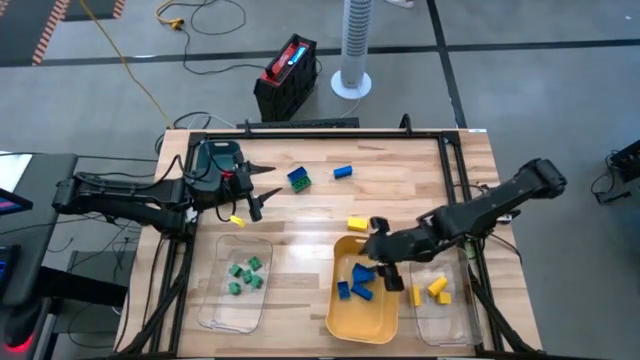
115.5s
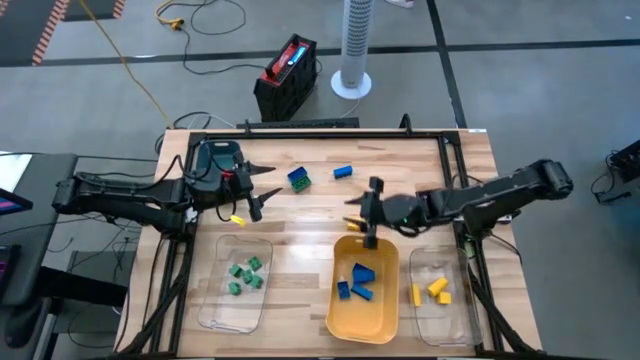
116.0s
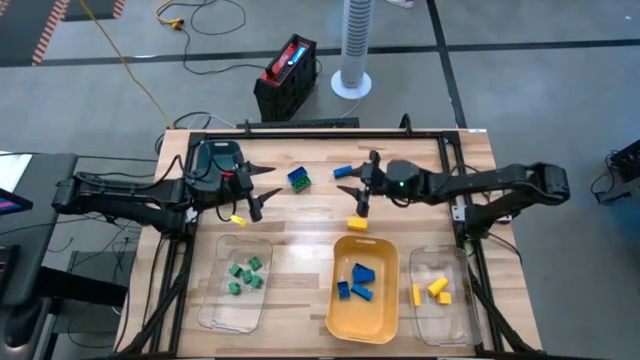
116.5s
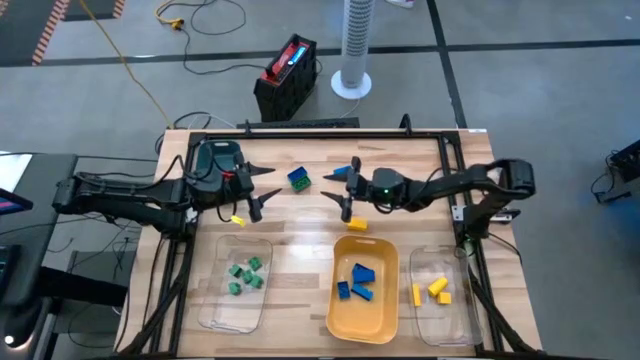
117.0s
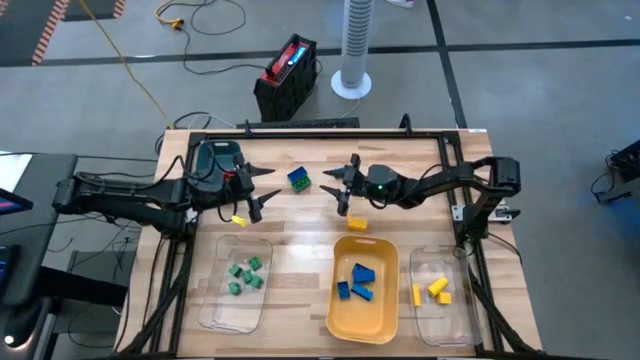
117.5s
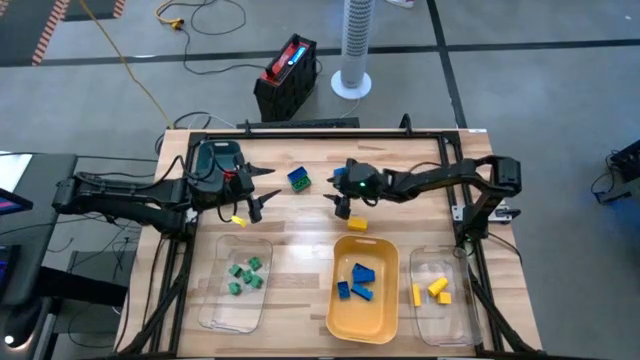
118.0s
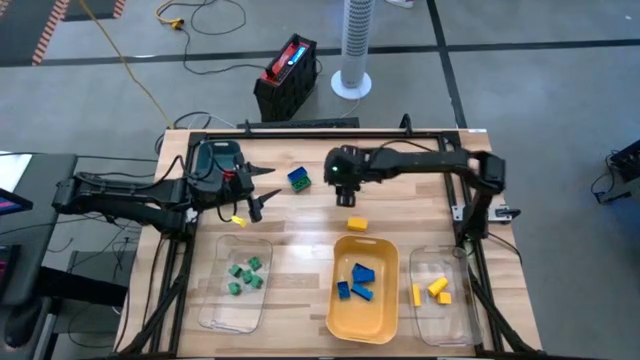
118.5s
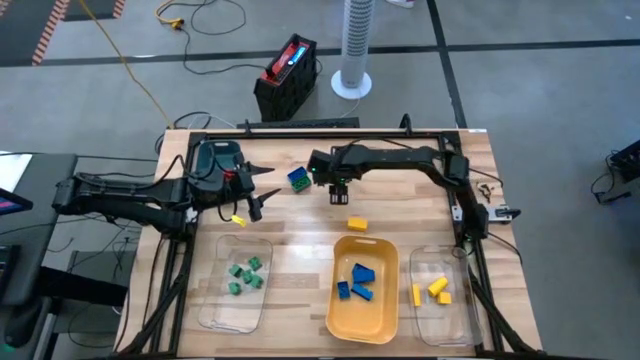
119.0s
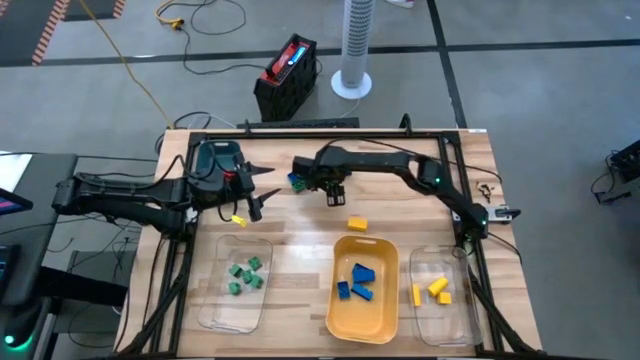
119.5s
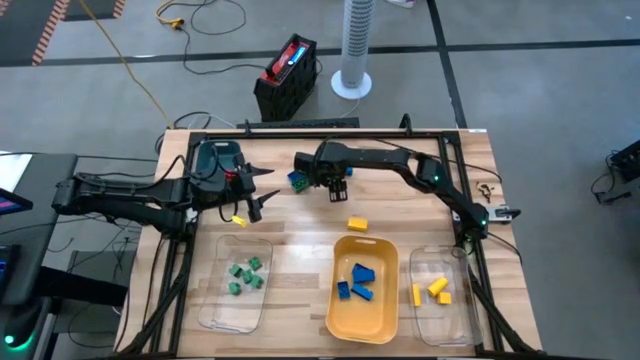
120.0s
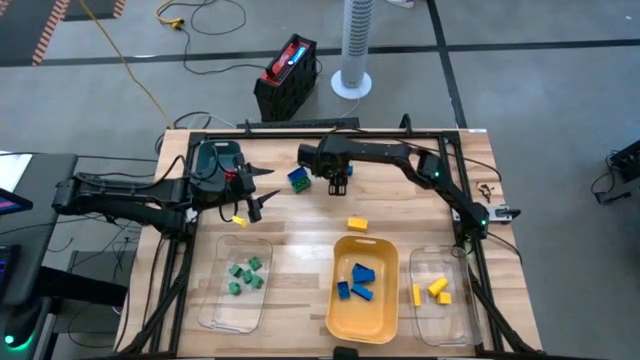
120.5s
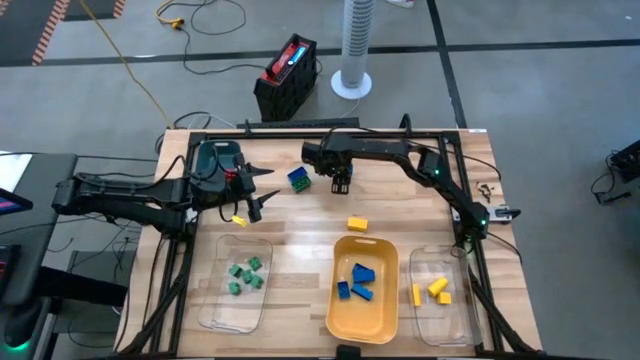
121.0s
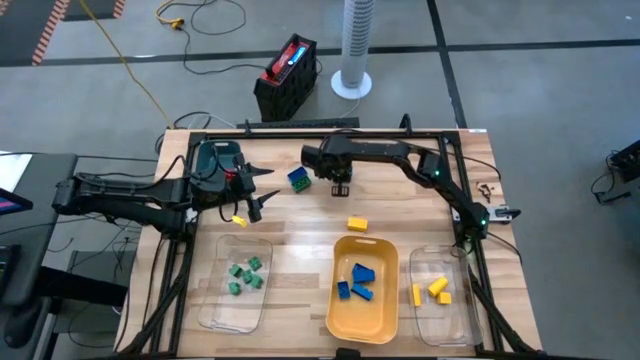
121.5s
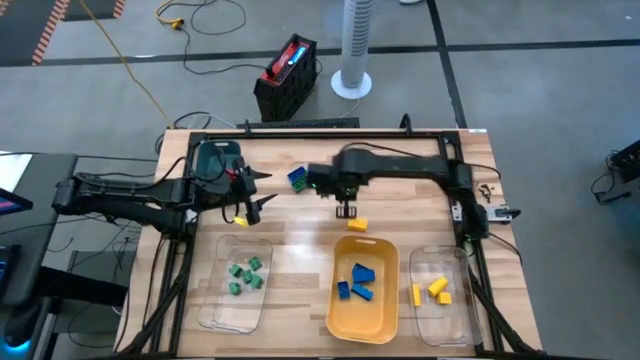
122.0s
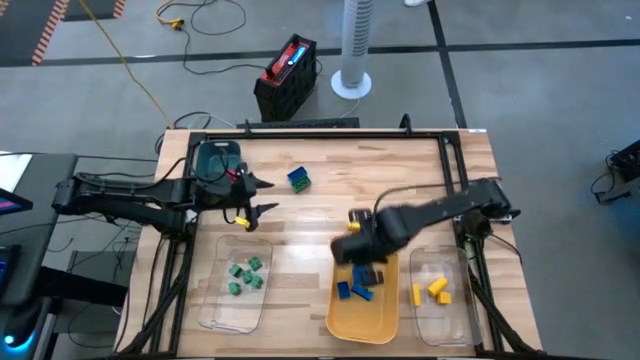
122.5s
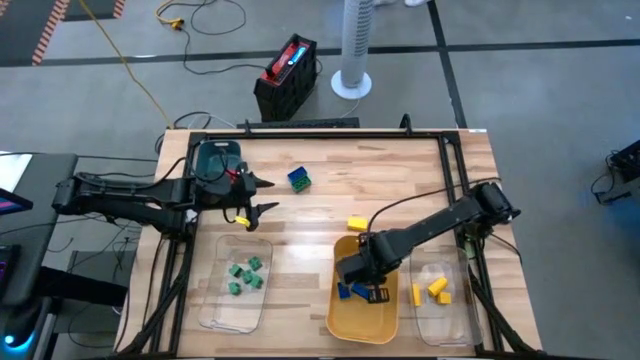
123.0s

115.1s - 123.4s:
Task: Sort blocks
Put the blue game piece into the yellow bin

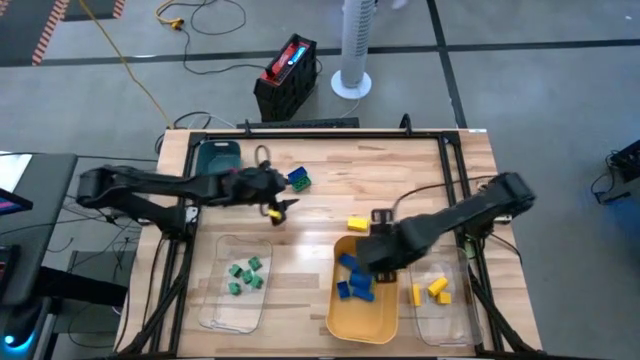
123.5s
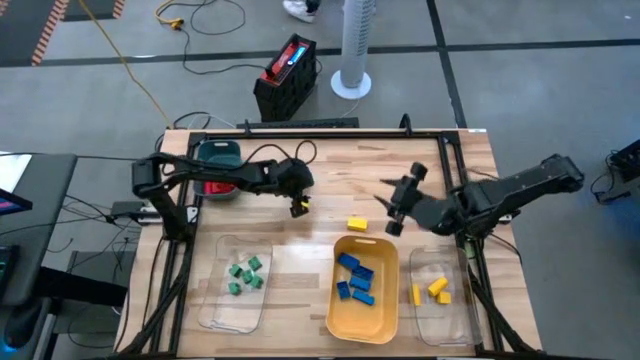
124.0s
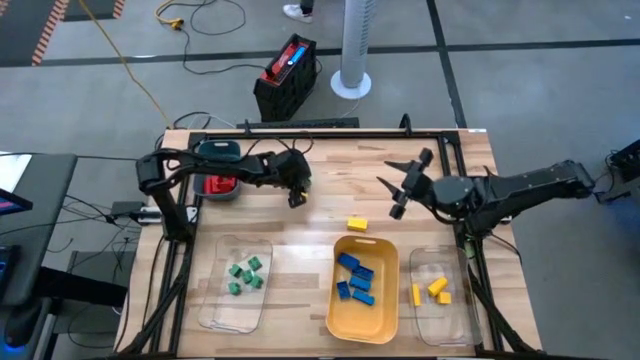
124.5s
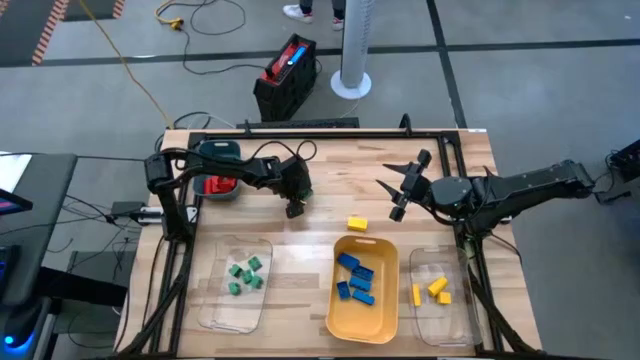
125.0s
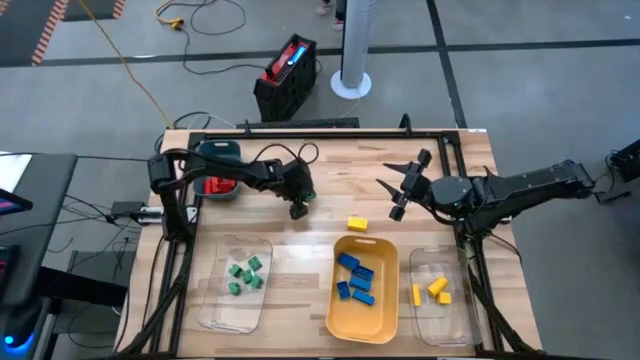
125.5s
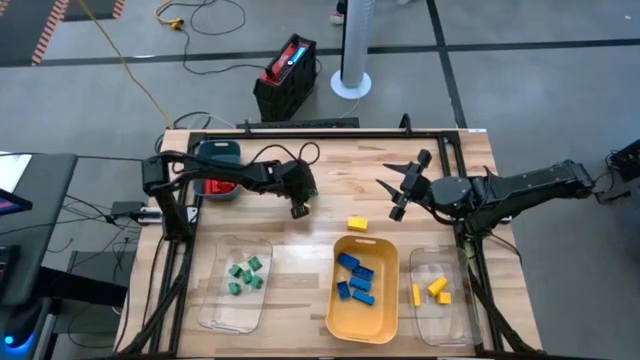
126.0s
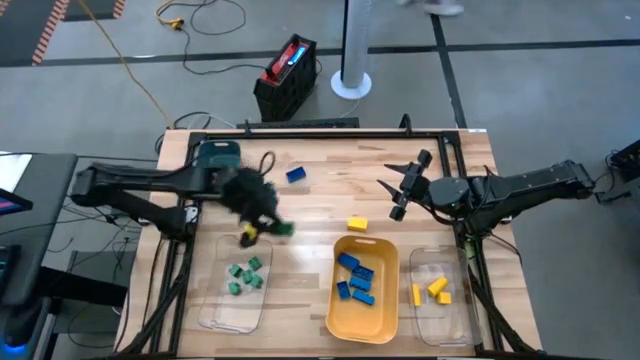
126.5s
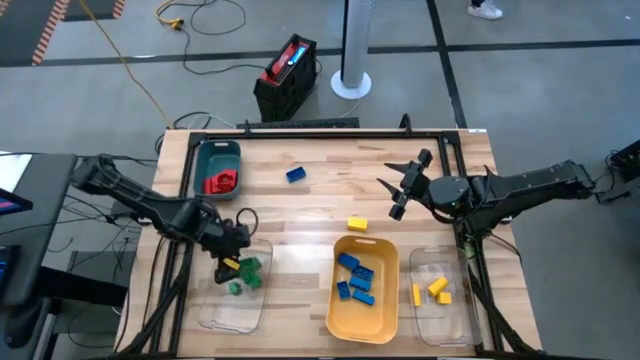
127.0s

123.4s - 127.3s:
Put the green game piece into the left transparent bin

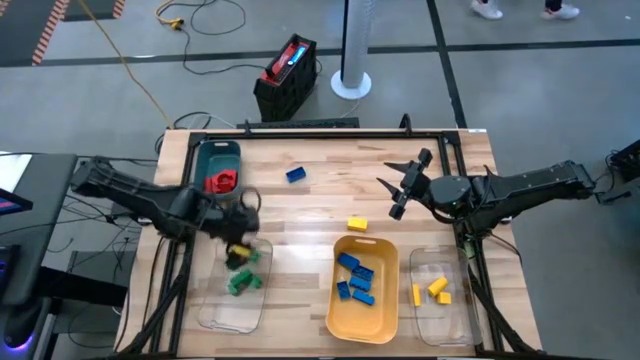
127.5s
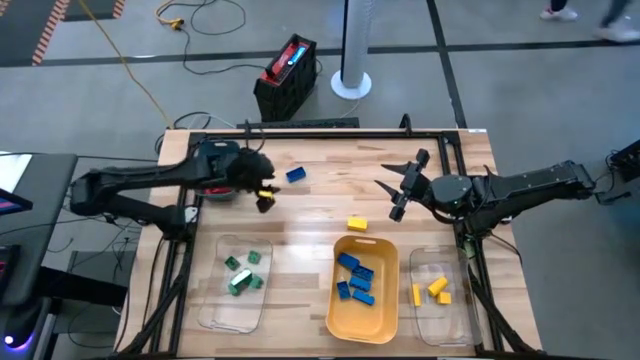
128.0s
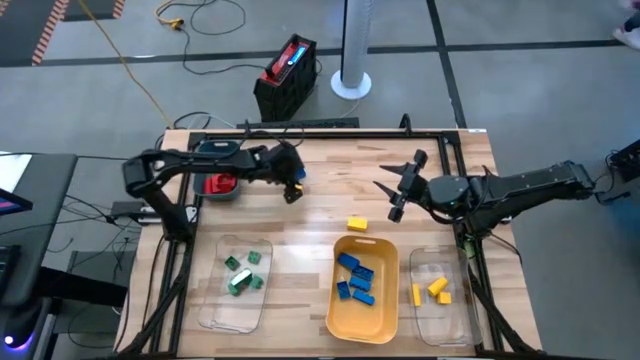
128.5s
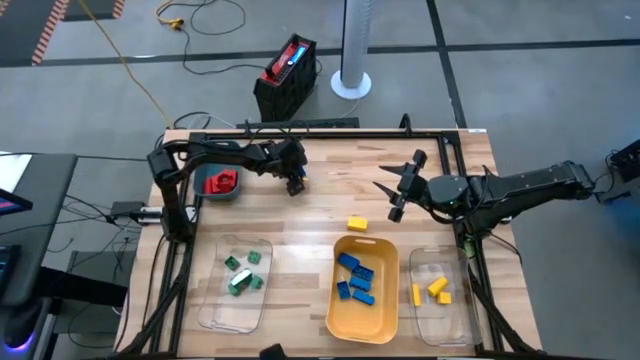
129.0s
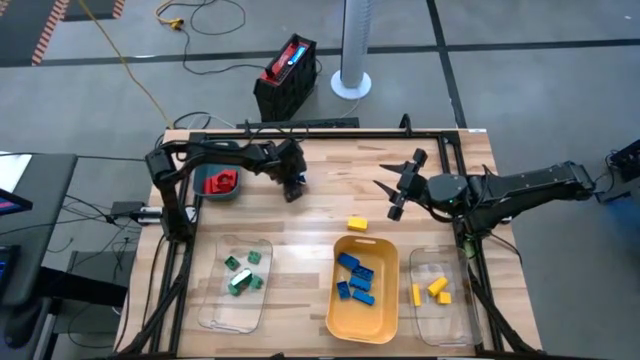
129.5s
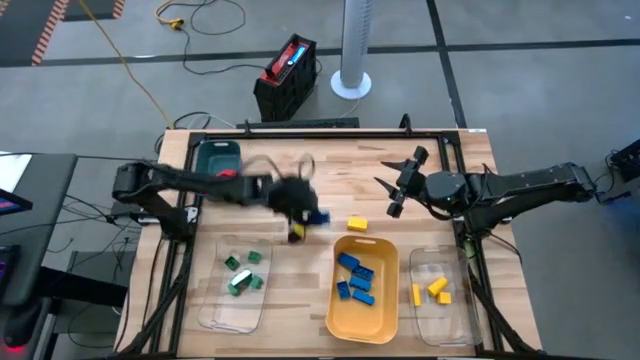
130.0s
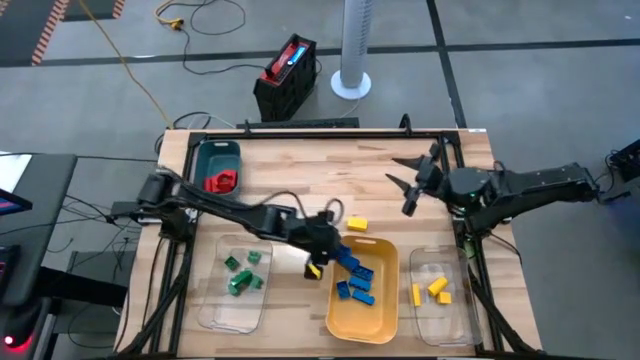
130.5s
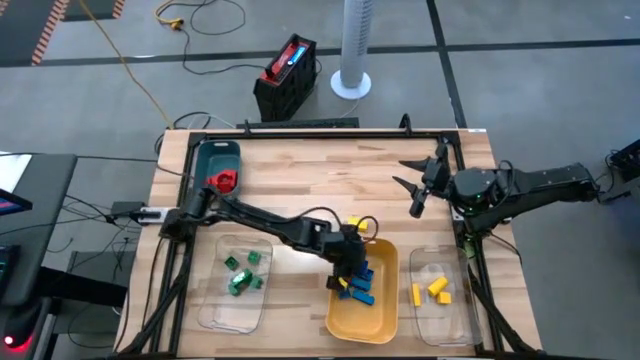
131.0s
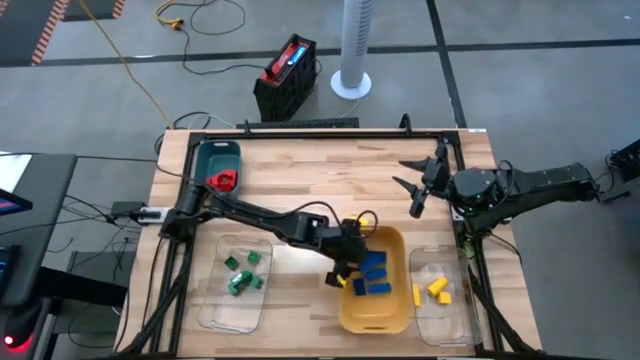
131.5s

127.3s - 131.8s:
Put the blue game piece into the yellow bin

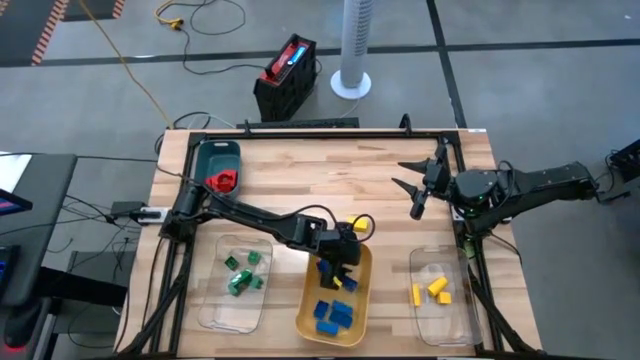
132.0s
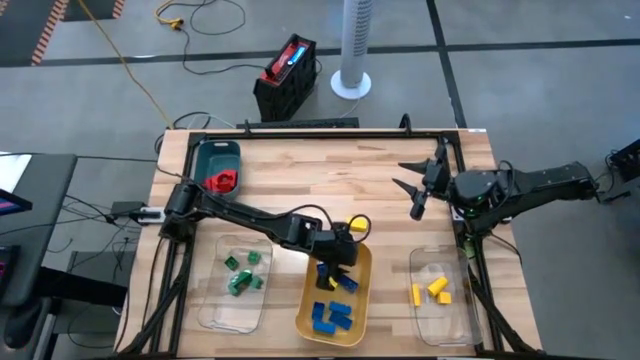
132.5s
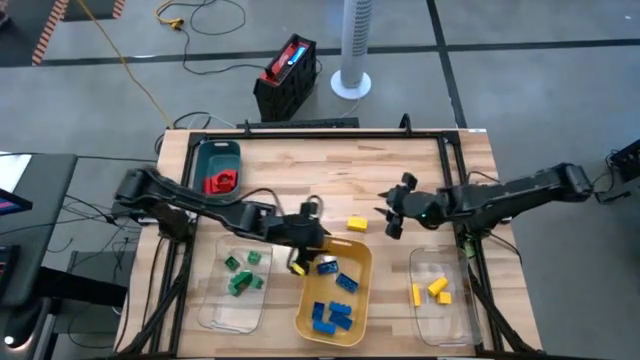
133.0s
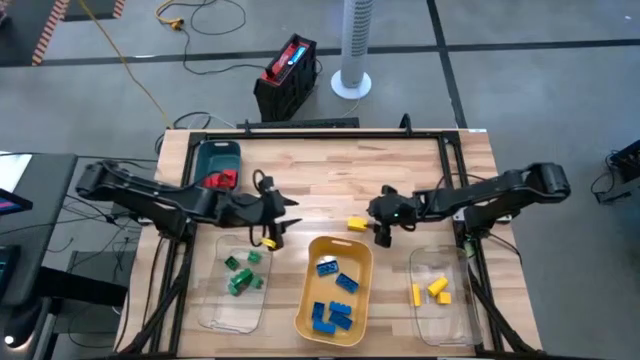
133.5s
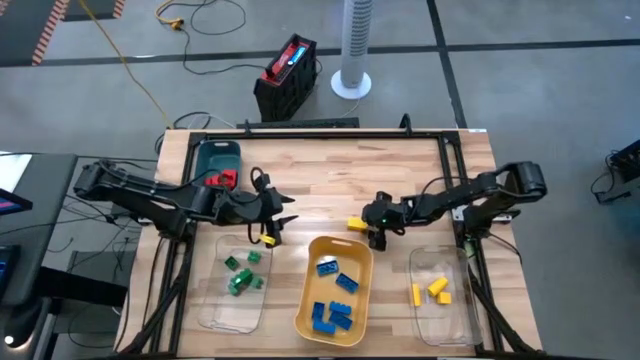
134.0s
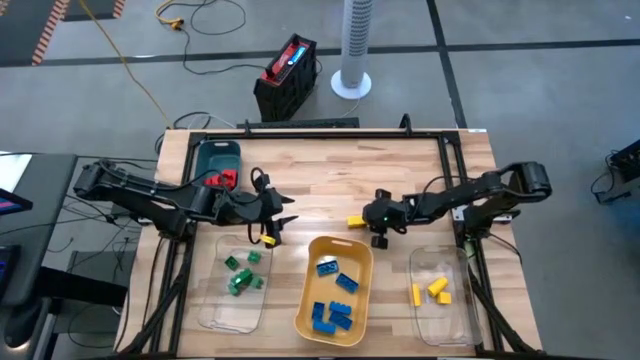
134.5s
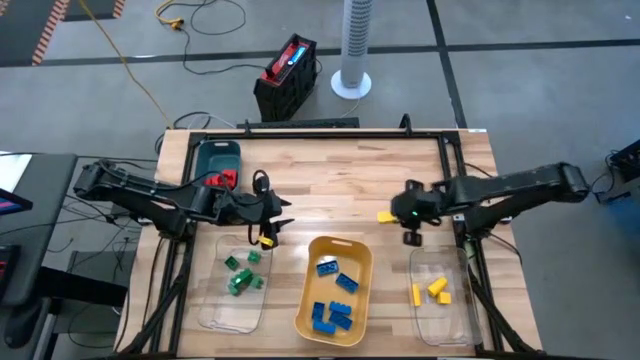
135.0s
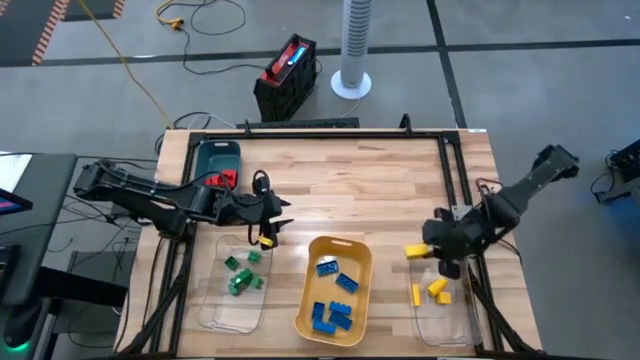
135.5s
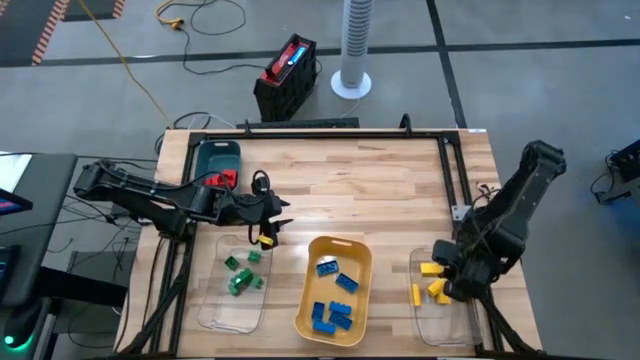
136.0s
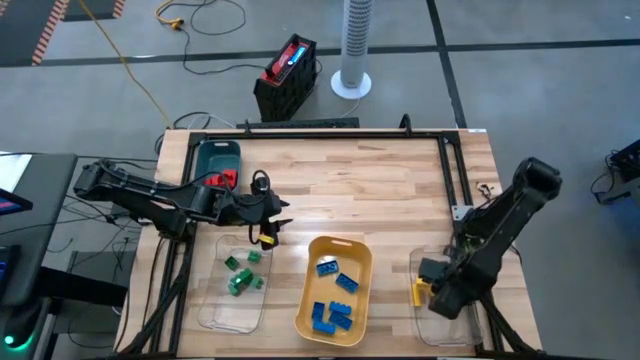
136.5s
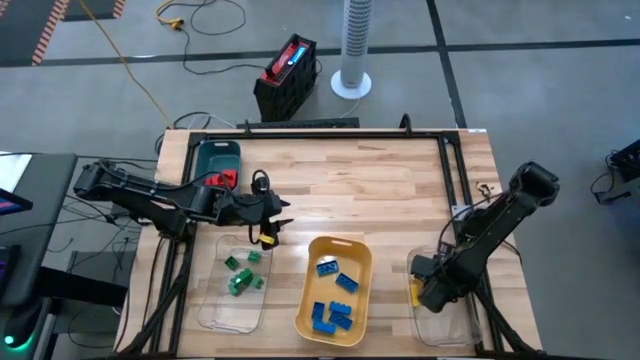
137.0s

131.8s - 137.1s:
Put the yellow wooden block into the right transparent bin
